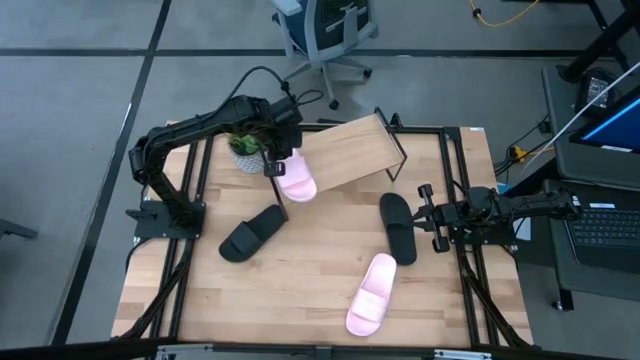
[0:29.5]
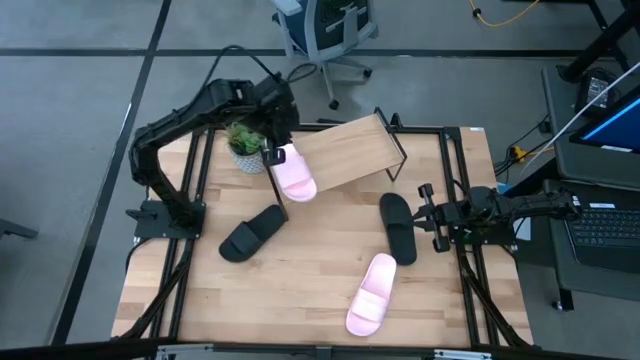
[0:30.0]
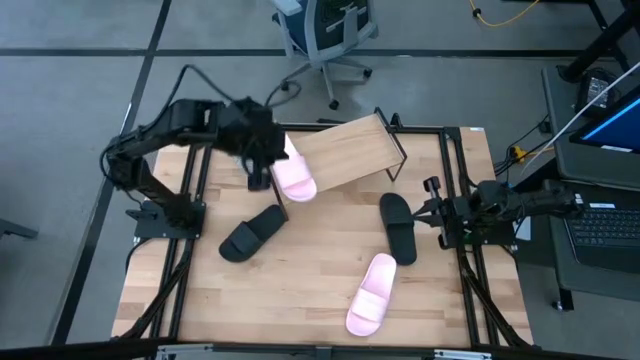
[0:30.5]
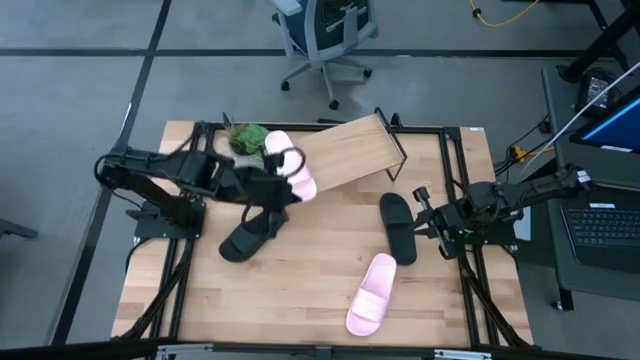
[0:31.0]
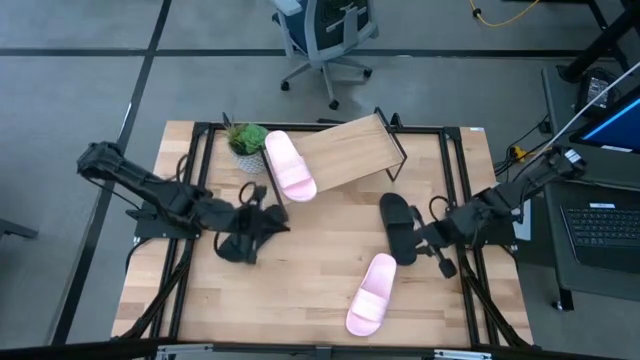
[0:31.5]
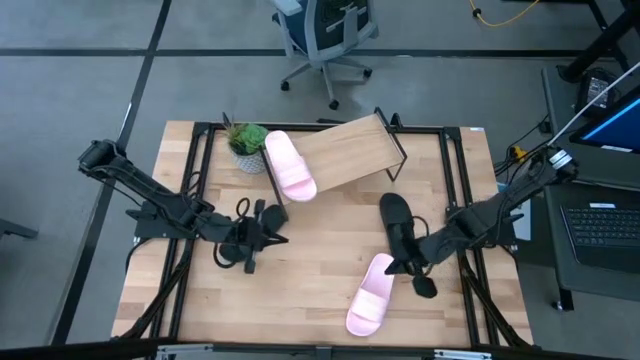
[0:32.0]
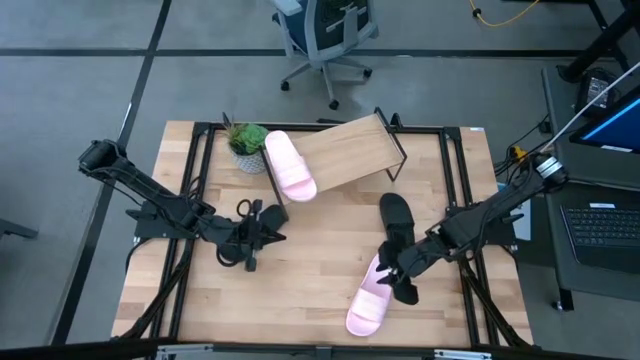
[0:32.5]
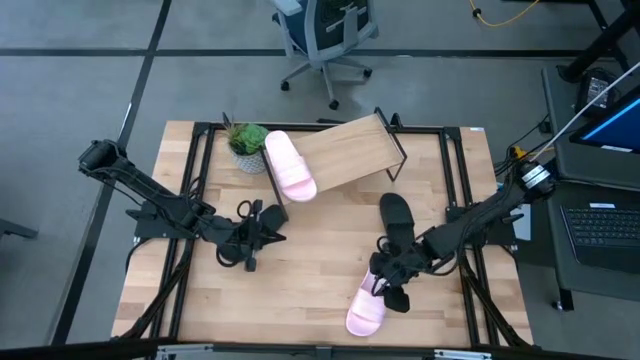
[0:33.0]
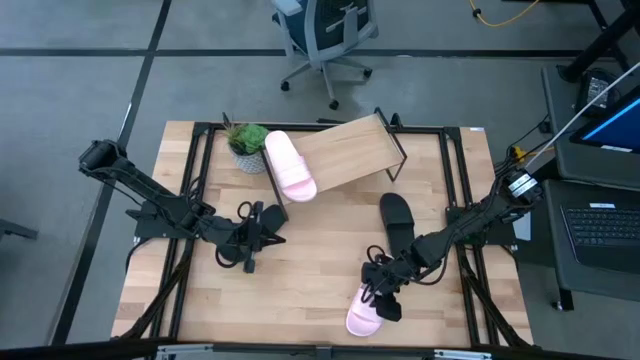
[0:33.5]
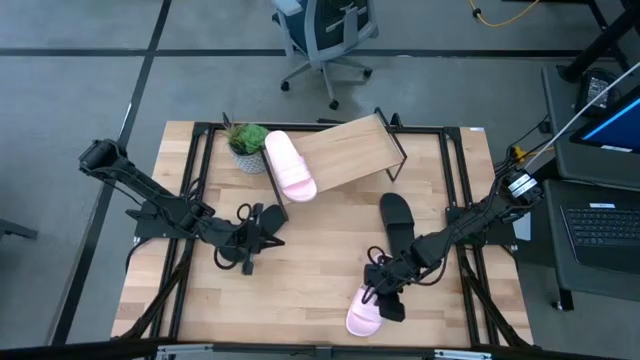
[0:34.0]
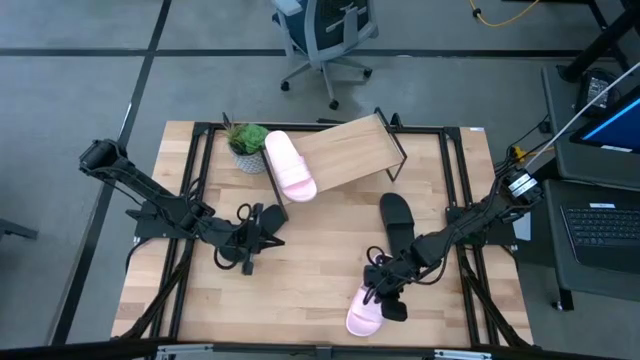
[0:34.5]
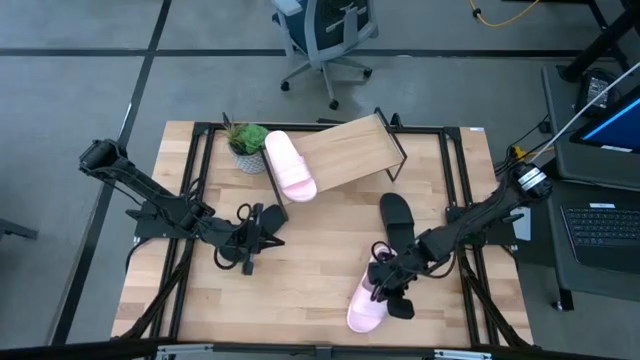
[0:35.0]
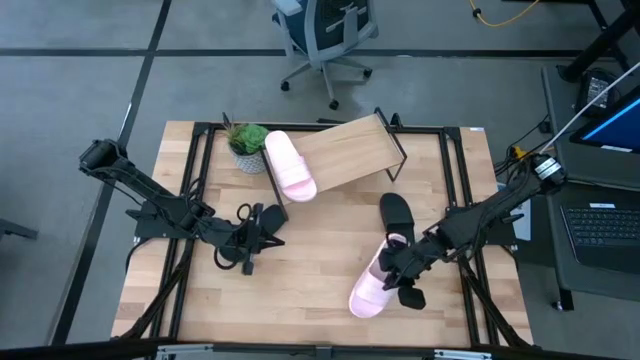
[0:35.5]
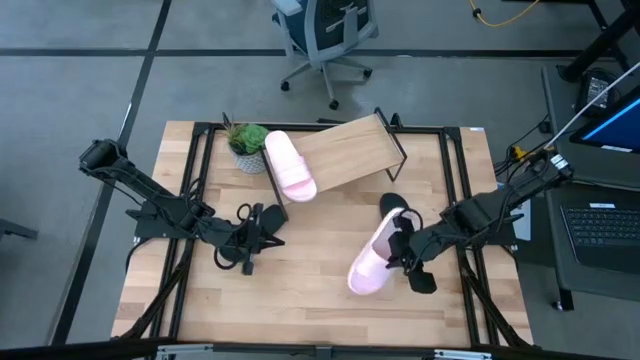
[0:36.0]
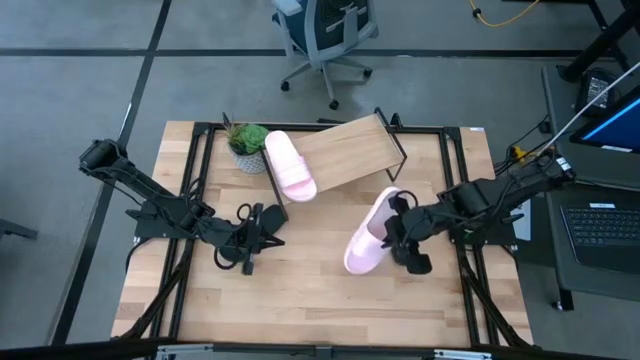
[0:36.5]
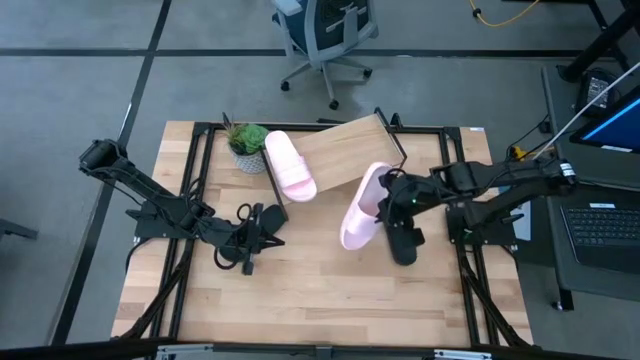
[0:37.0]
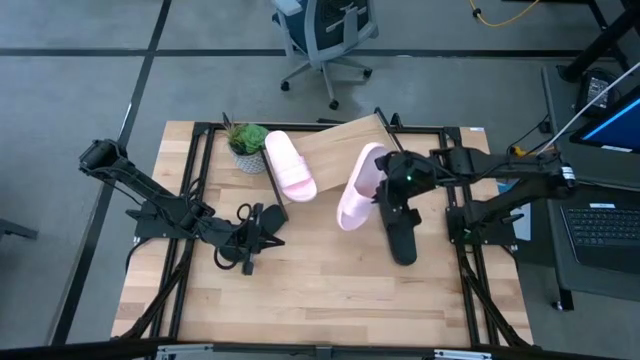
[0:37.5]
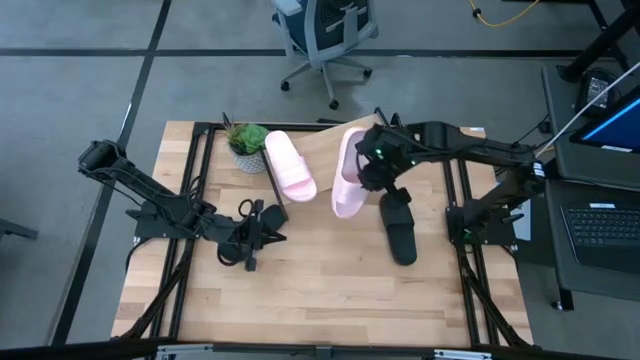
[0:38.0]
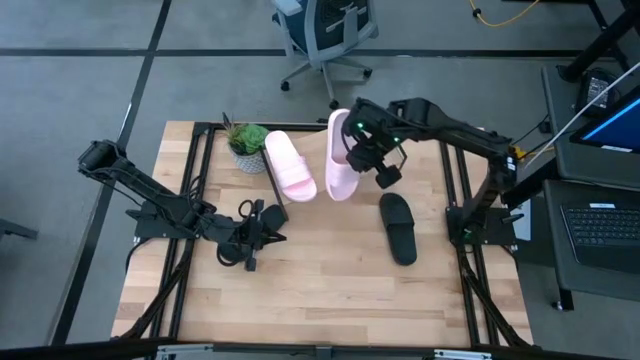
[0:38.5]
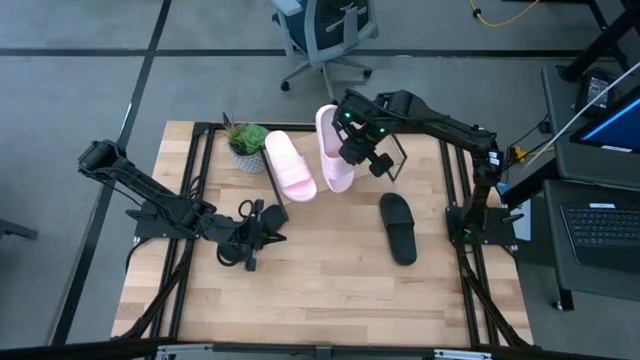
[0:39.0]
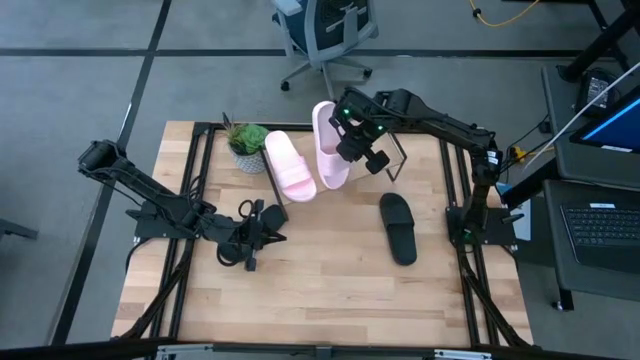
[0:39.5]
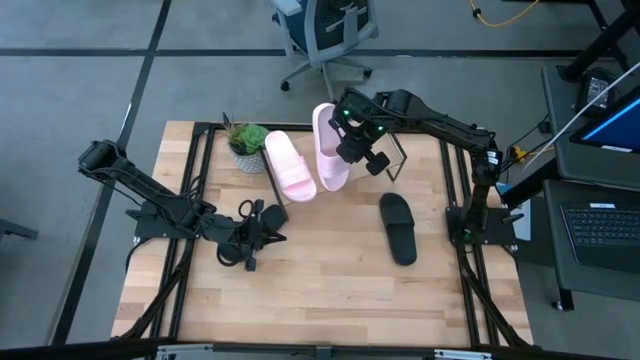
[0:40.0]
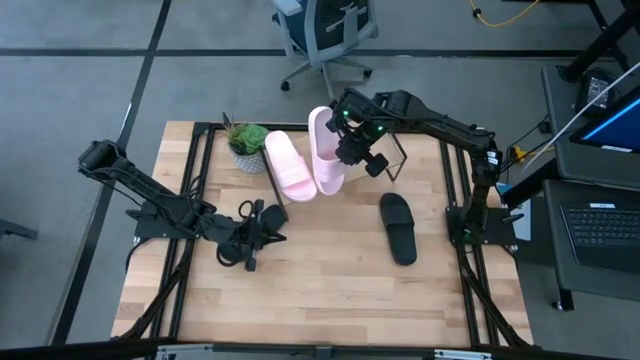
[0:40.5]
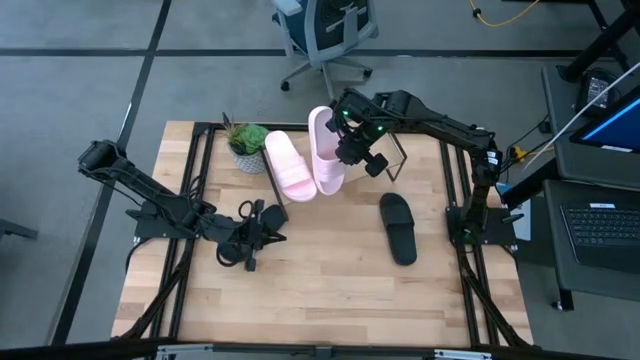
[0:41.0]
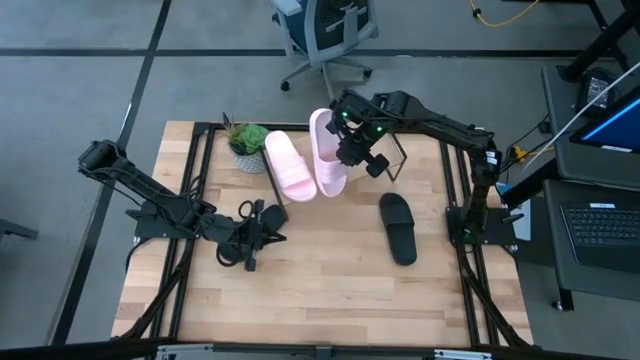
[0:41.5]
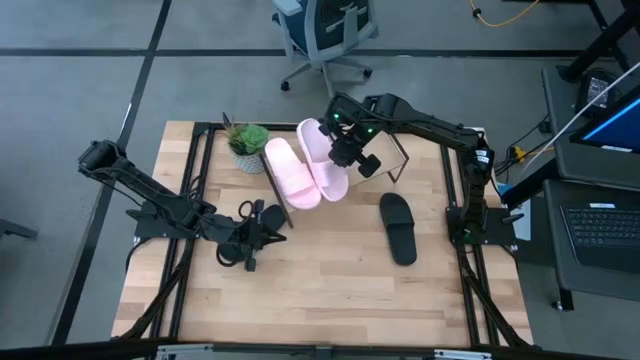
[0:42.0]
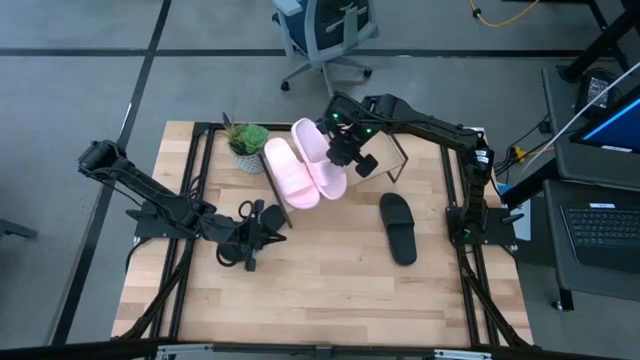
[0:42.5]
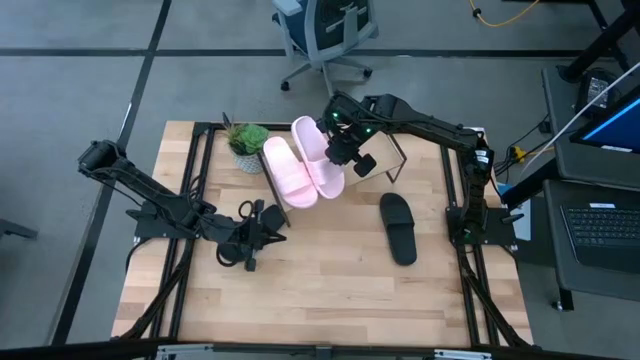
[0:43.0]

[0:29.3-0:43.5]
Task: Pick and place slides into the shelf
Put the pink slide on the shelf

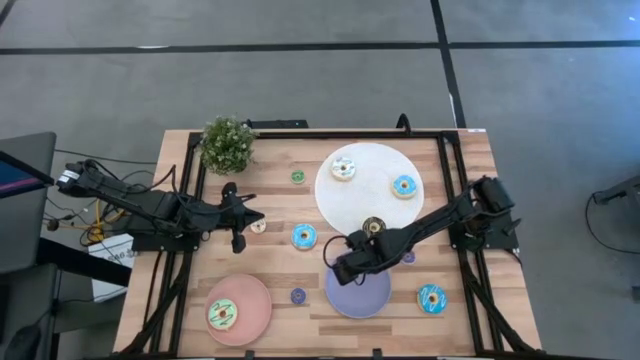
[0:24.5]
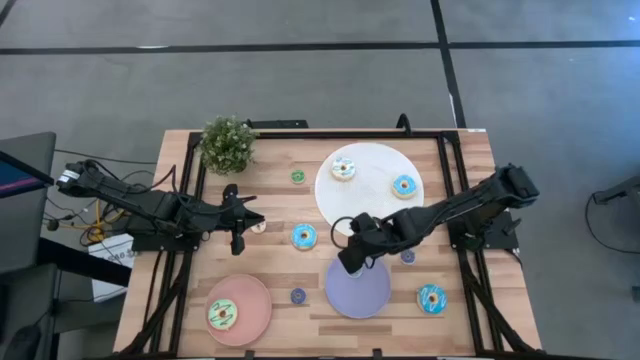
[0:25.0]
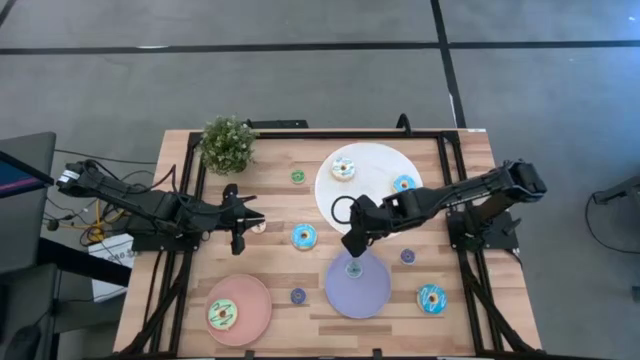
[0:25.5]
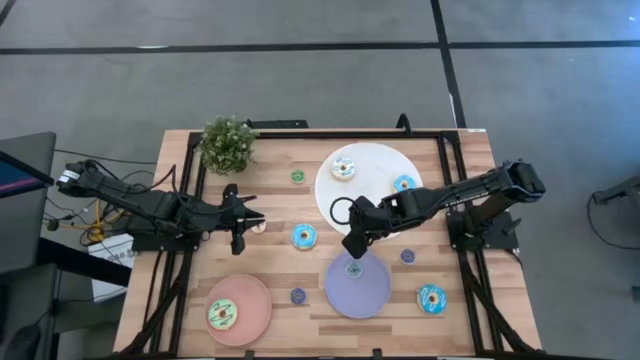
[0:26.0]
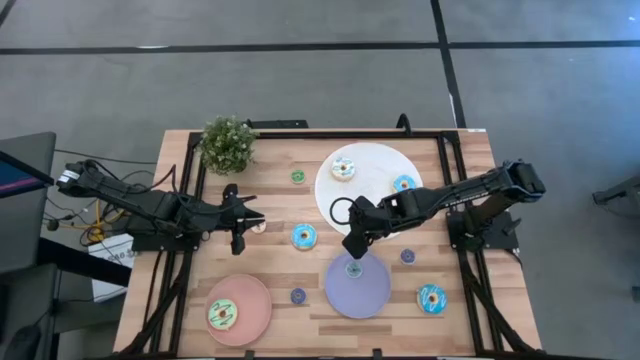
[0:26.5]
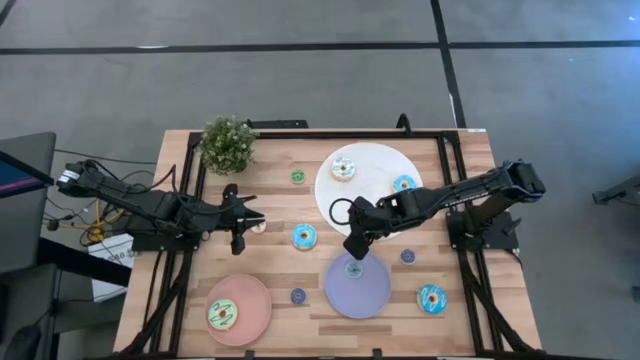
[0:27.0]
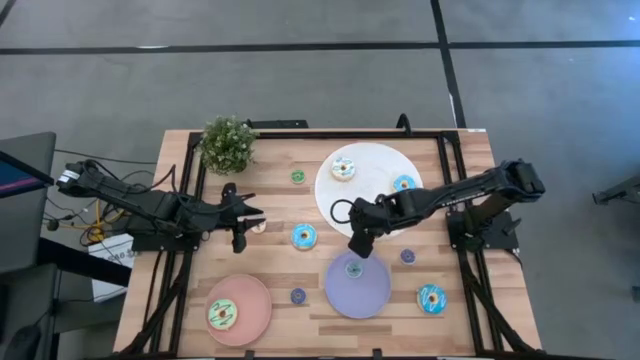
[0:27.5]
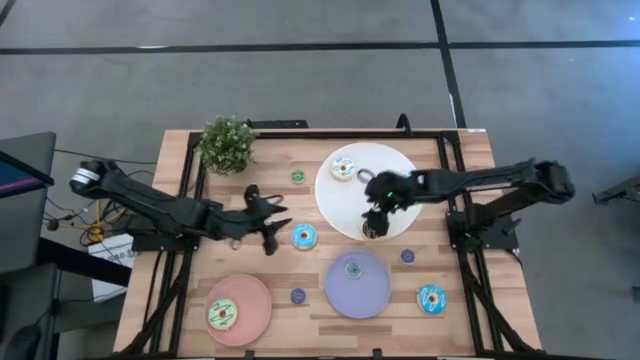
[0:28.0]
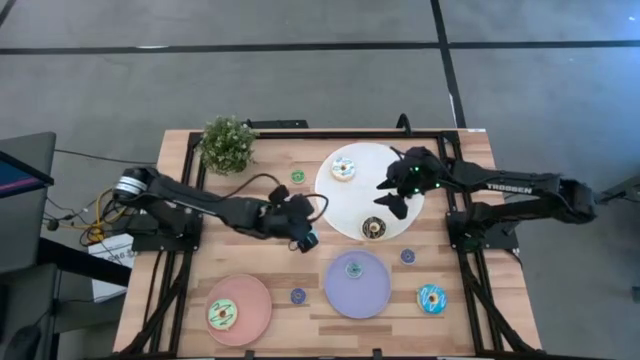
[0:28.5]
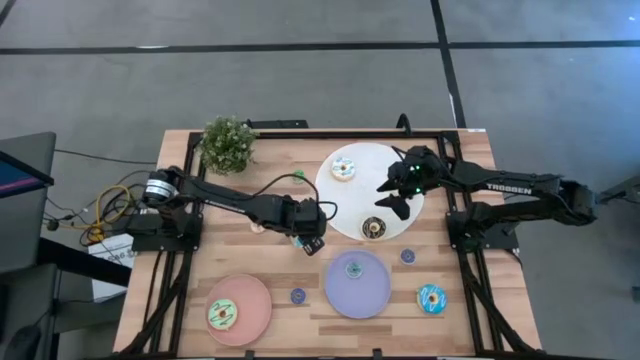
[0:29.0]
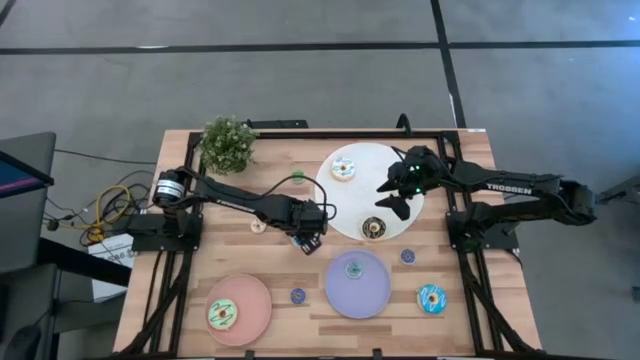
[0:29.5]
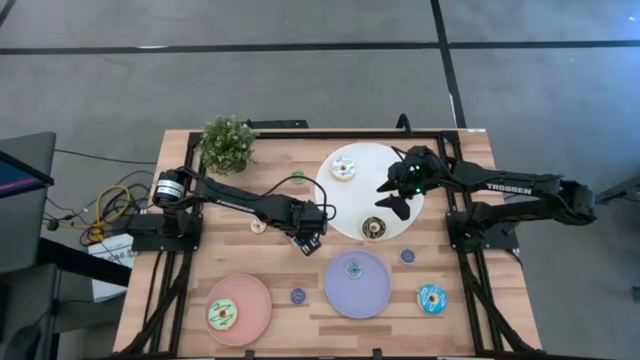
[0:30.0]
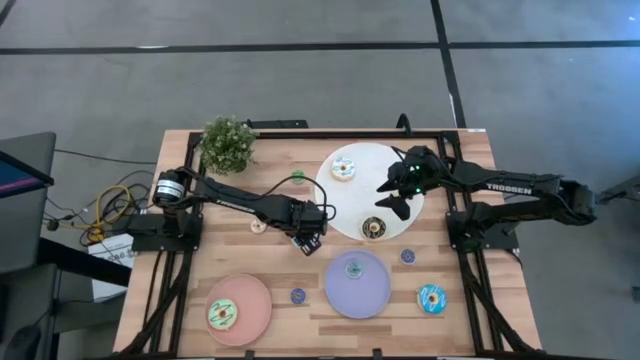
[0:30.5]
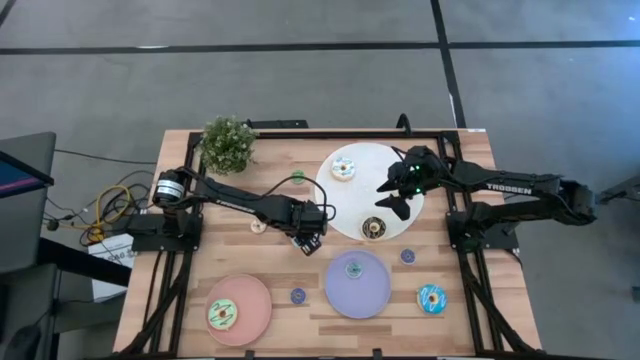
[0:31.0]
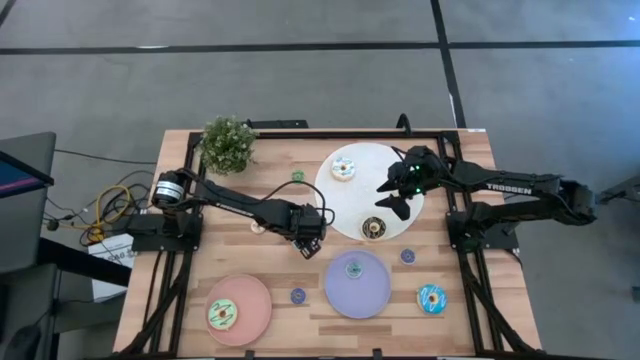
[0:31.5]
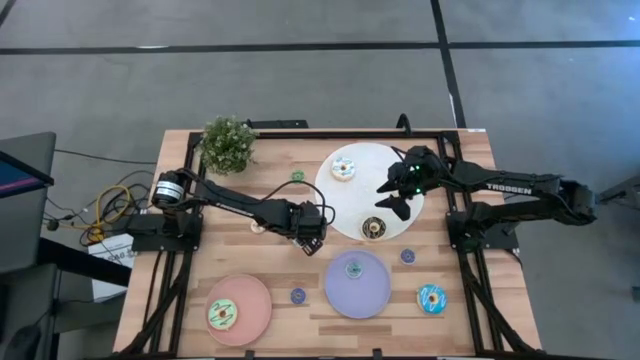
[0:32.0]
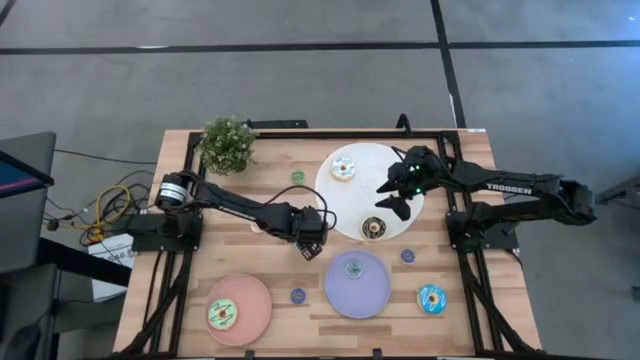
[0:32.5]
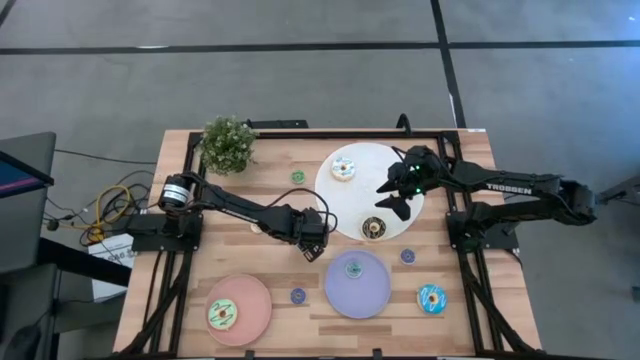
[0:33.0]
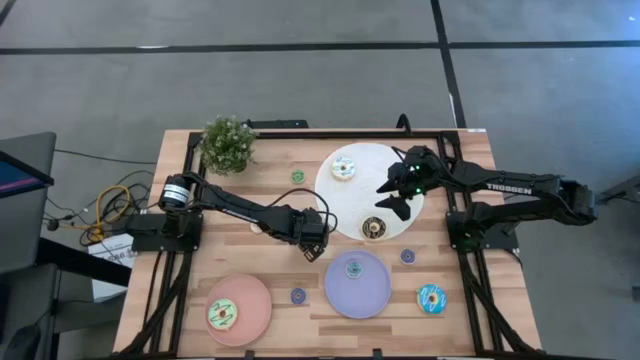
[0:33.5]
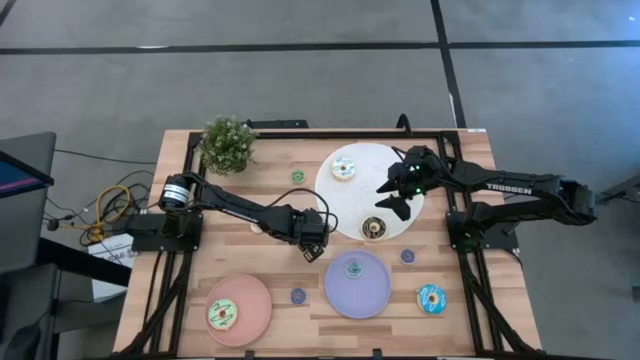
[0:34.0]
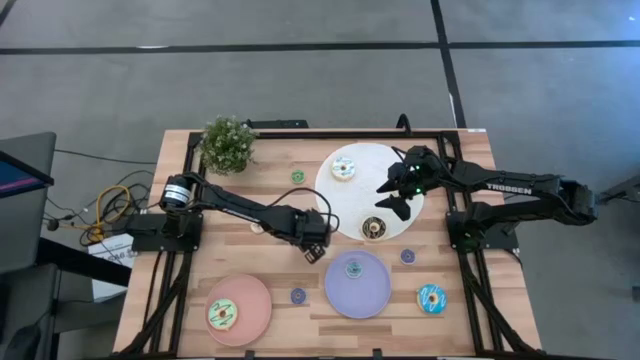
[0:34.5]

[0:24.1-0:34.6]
Task: Pick & Place donuts
Put the left big light blue donut on the pink plate
